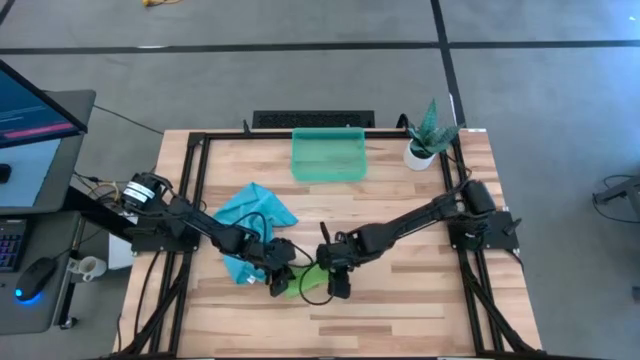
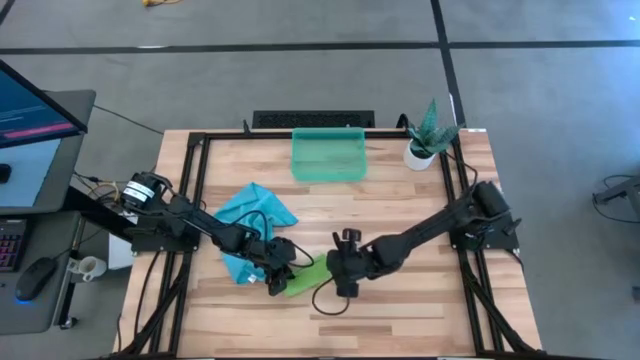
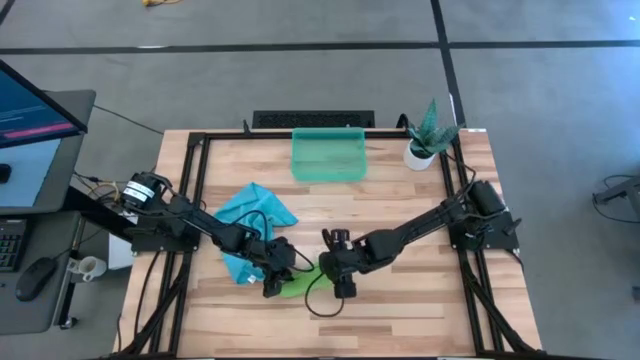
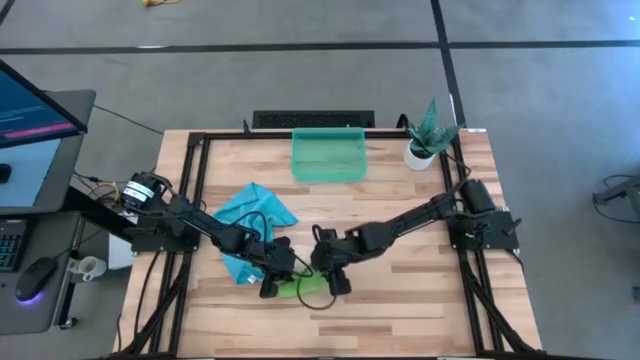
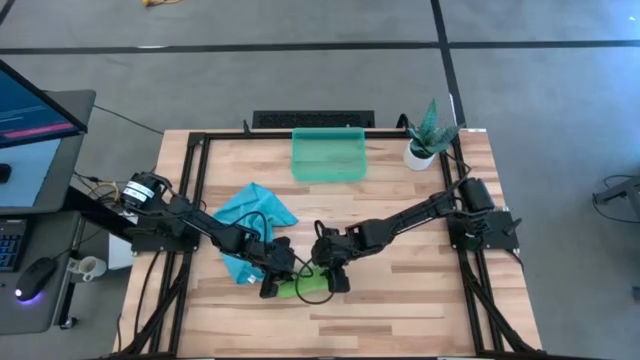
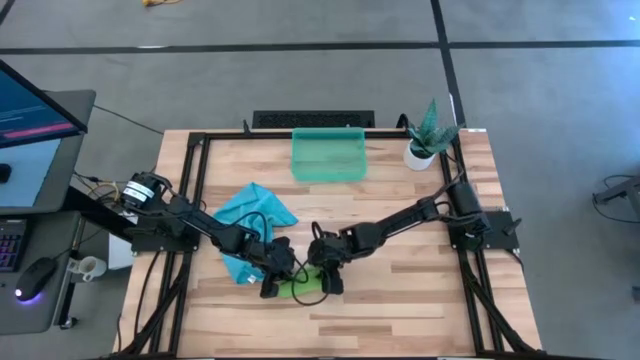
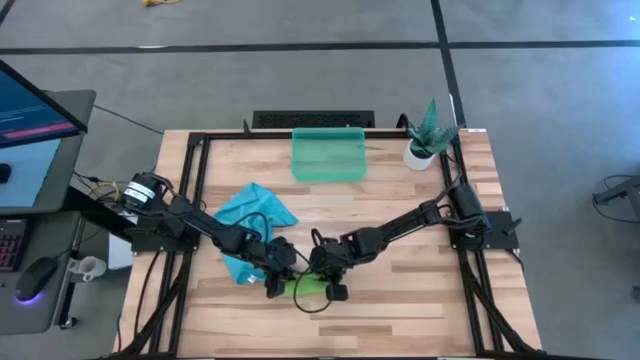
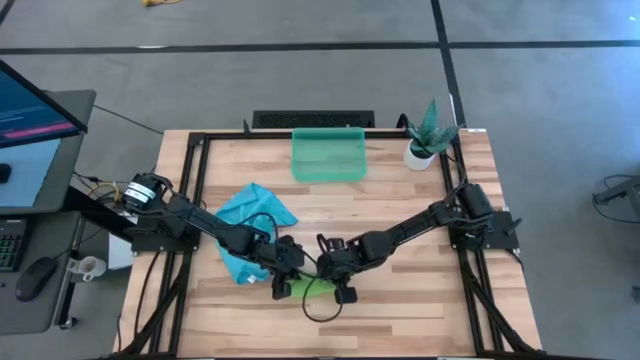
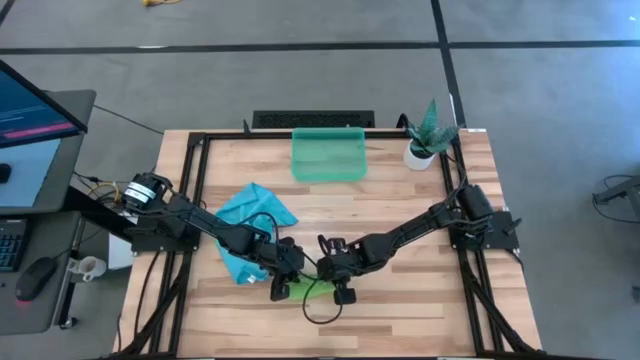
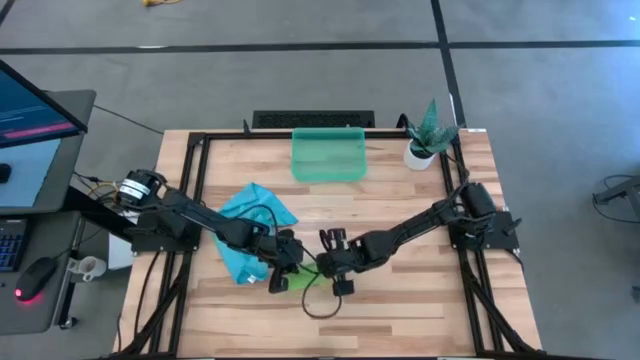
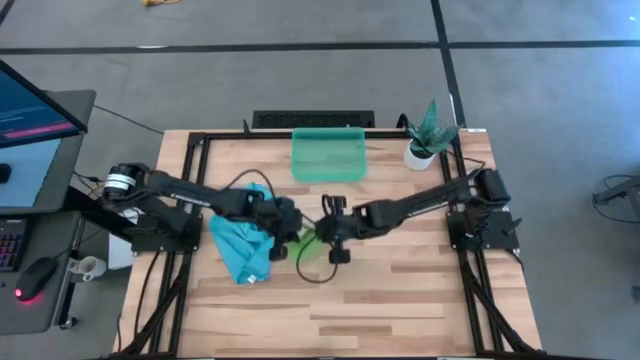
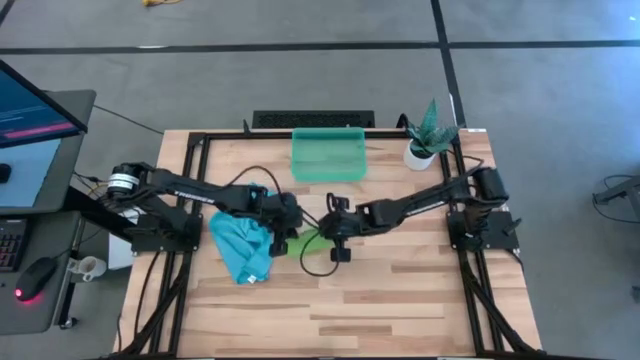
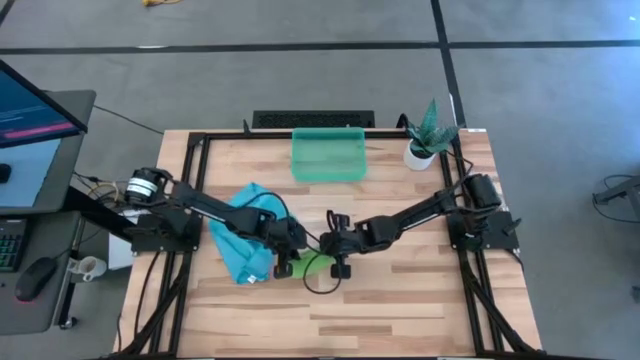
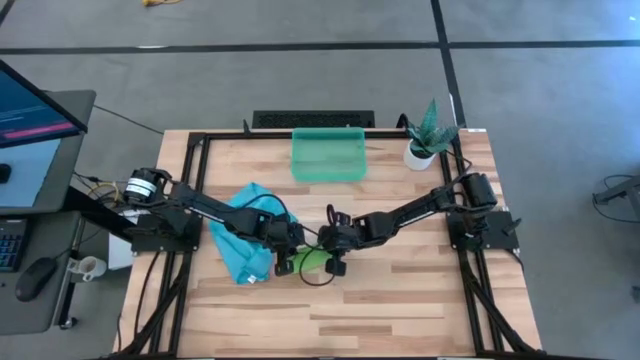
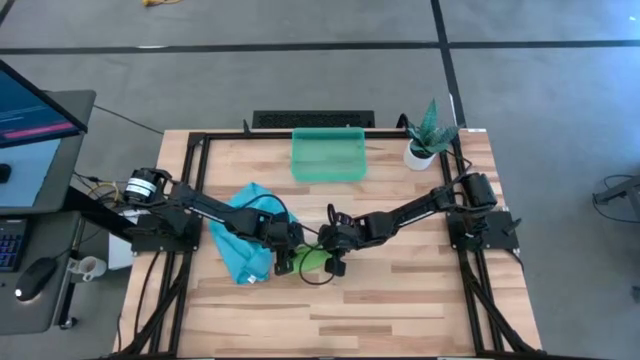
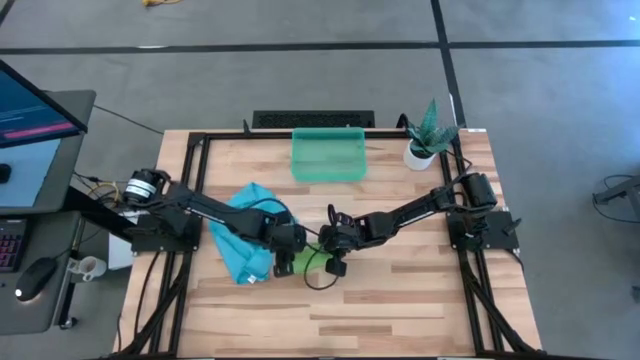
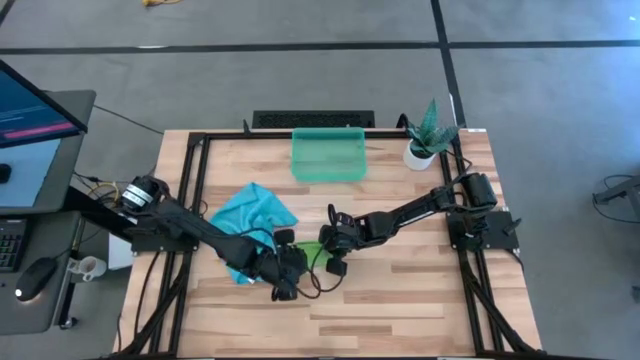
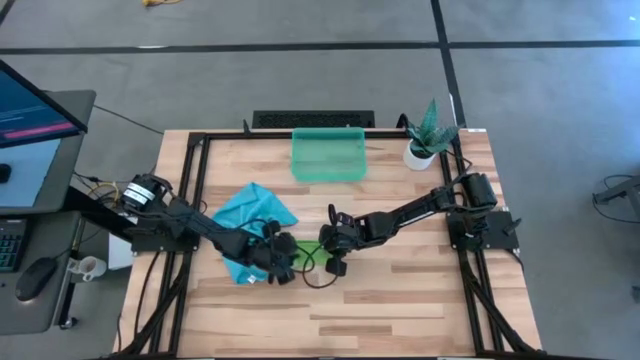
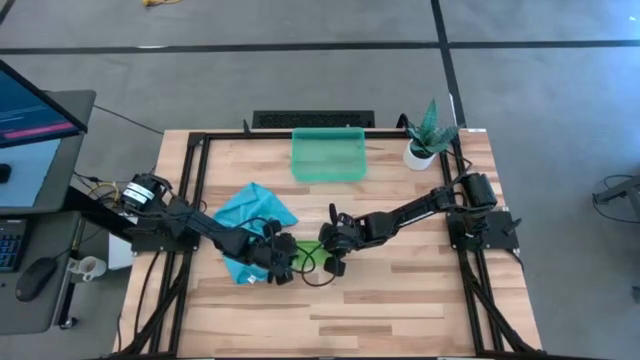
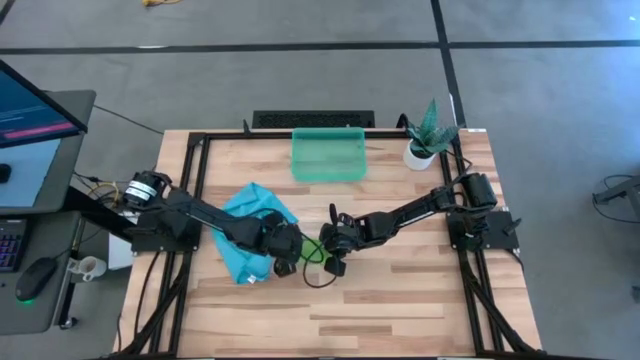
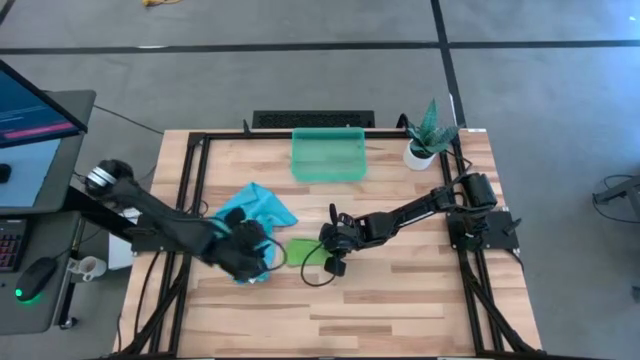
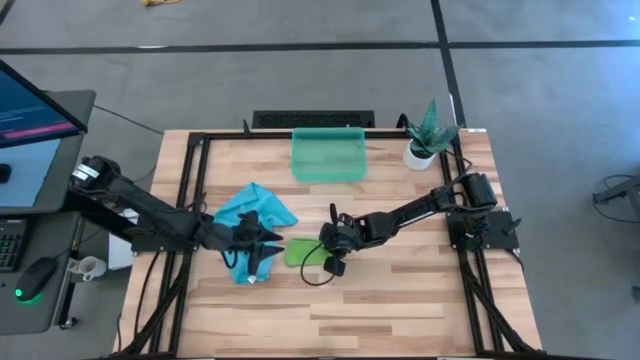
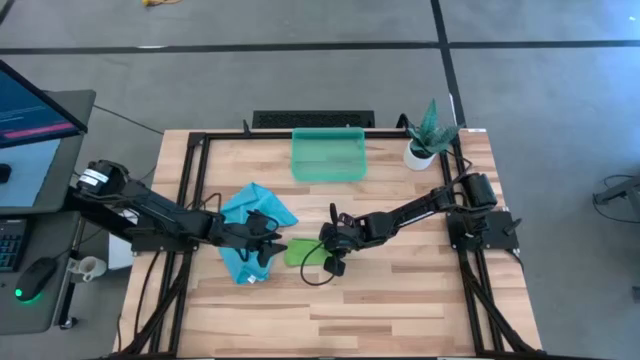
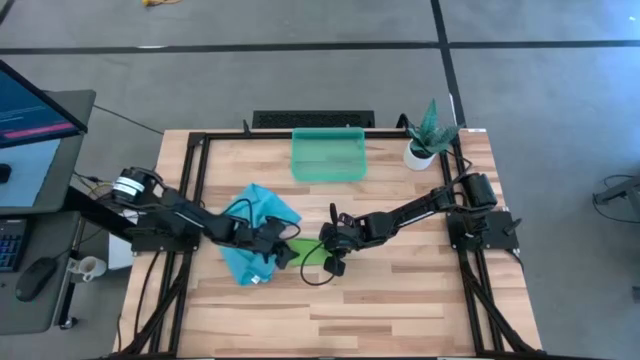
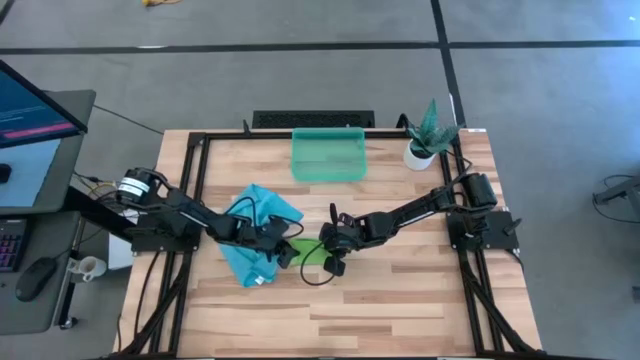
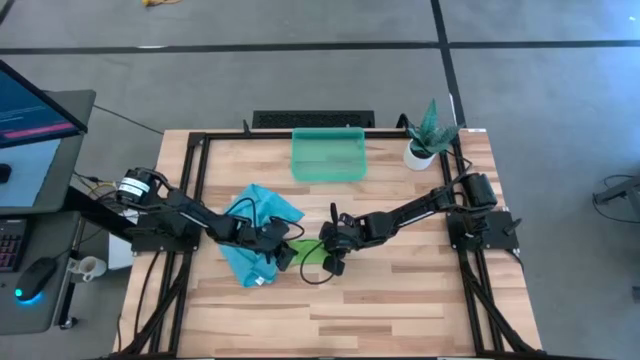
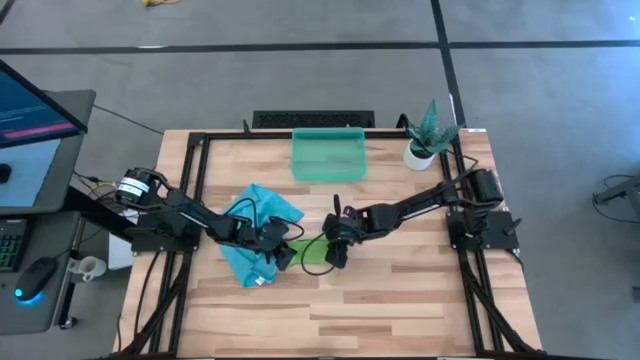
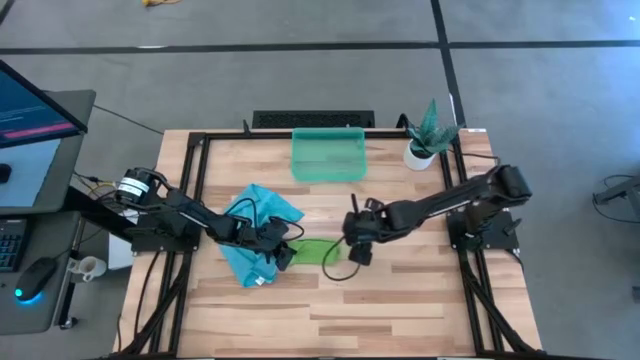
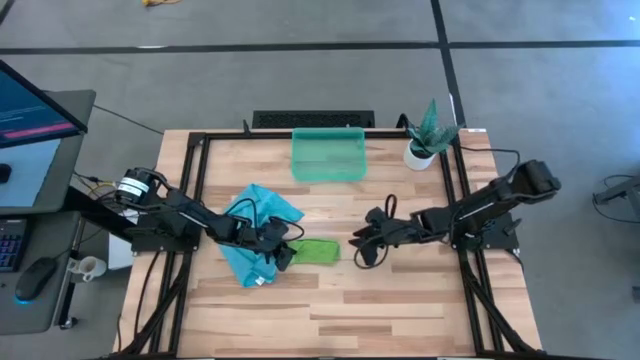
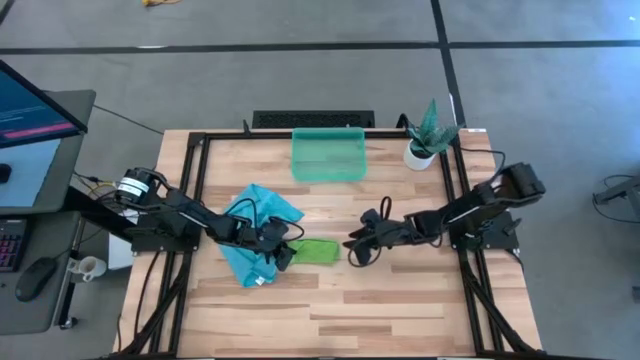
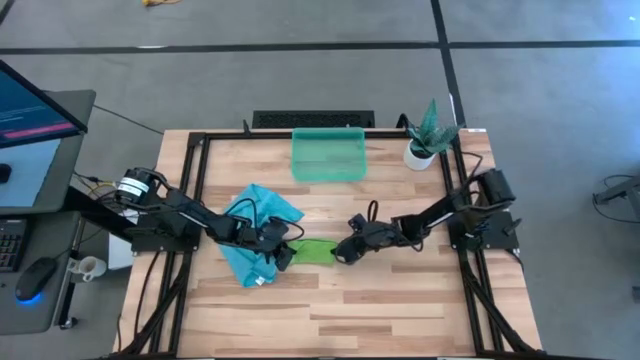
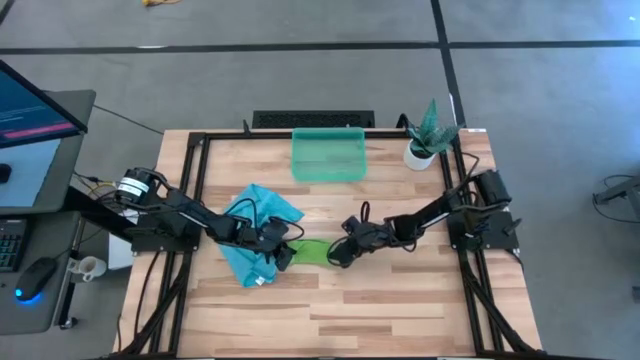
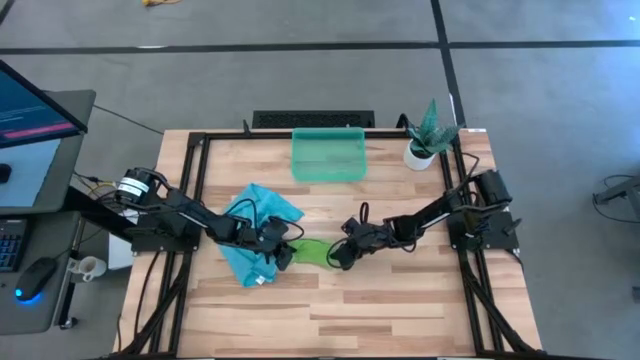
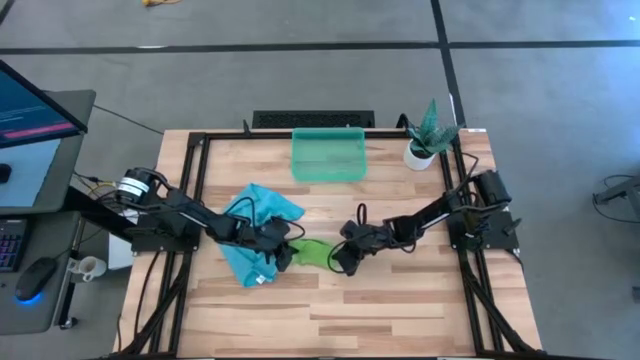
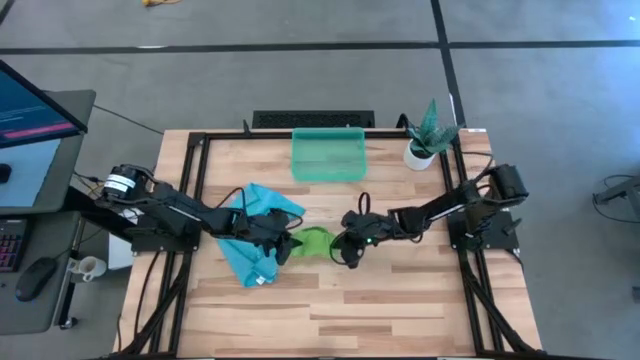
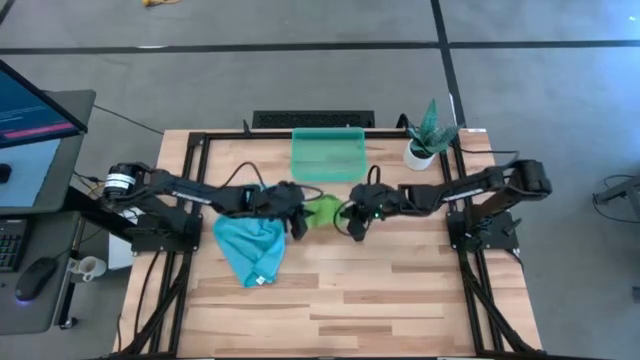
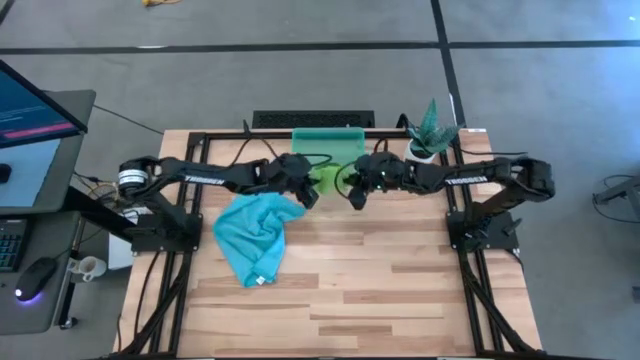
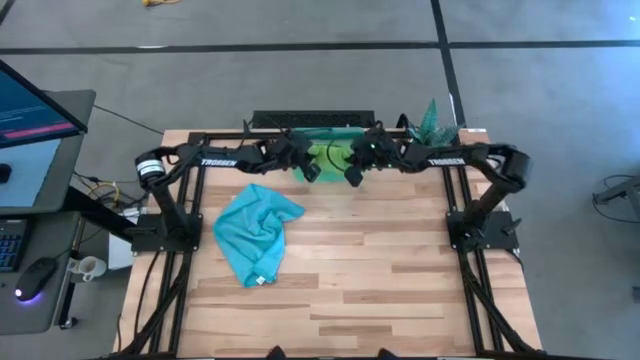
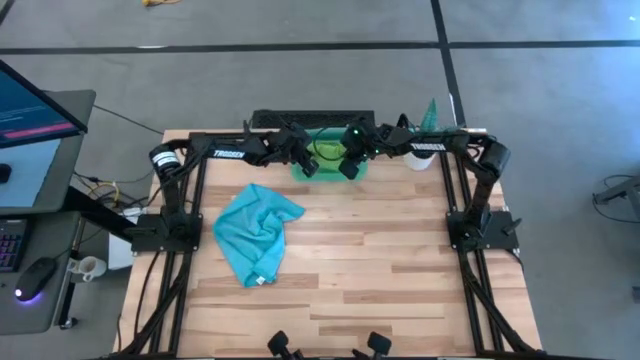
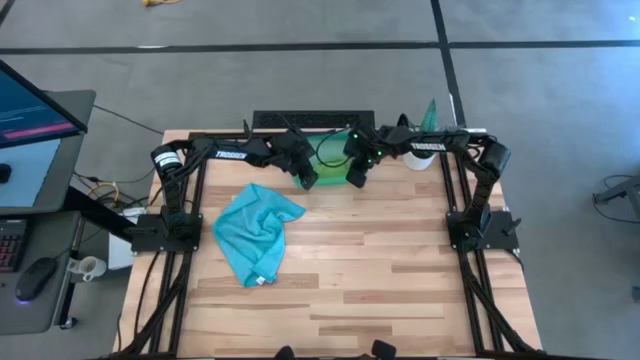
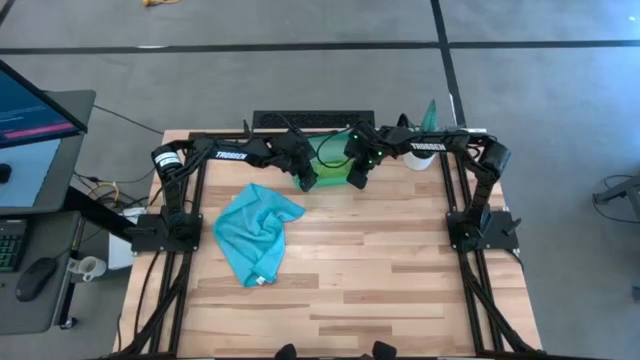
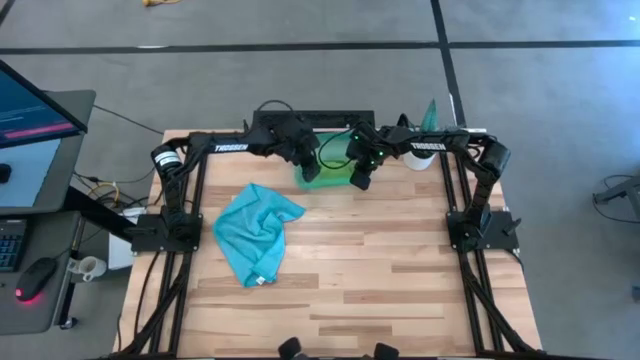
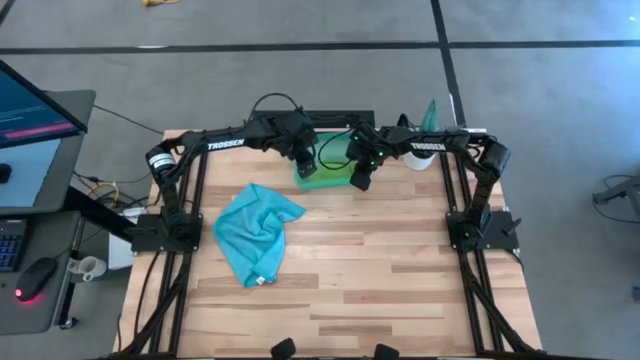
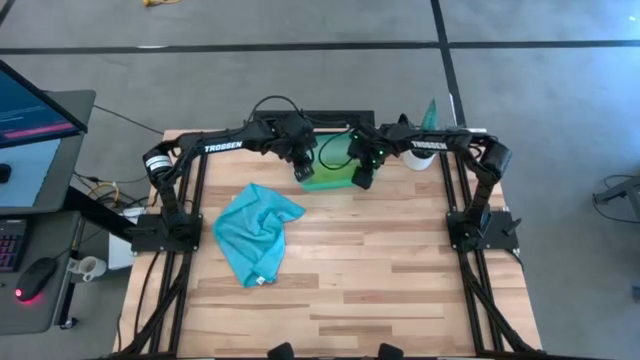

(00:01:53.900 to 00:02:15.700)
Task: Roll microfiber towels into tight, uniform cylinder then place into a basket
Put the rolled green microfiber cloth into the green bin

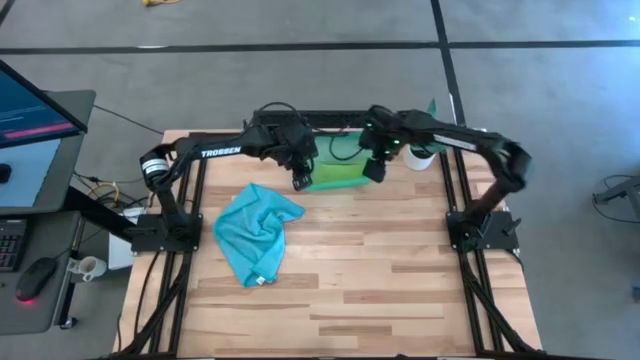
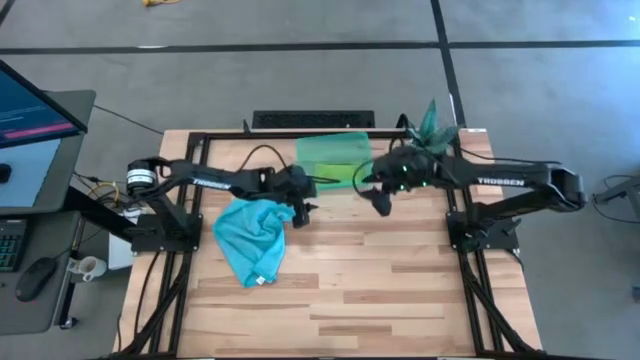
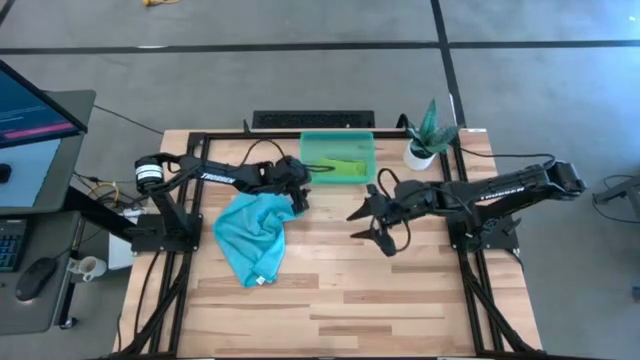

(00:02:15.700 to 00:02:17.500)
Adjust the green bin
